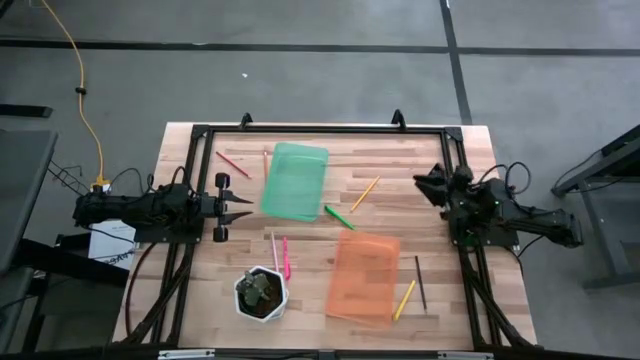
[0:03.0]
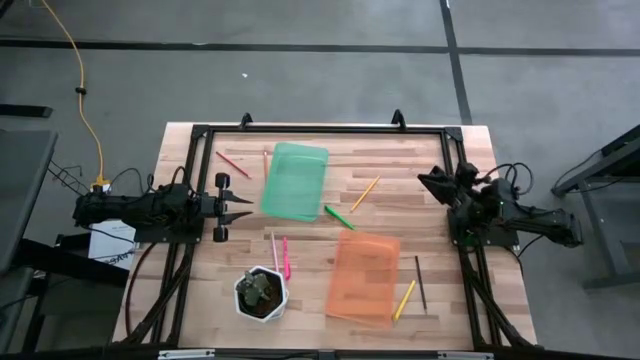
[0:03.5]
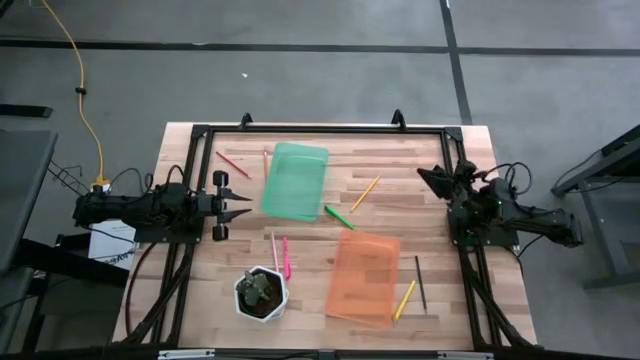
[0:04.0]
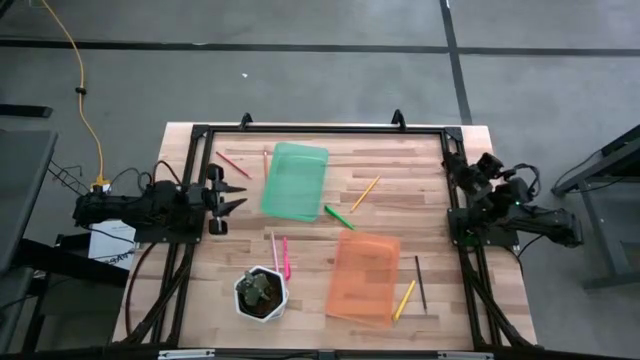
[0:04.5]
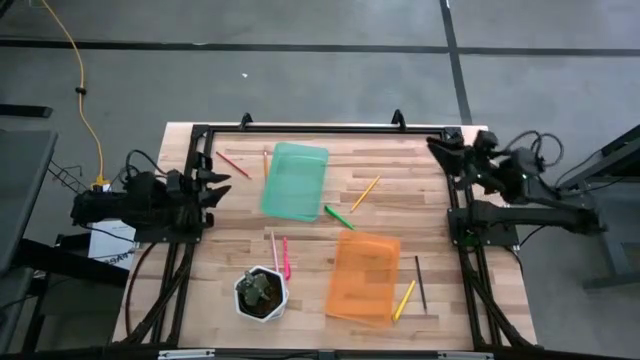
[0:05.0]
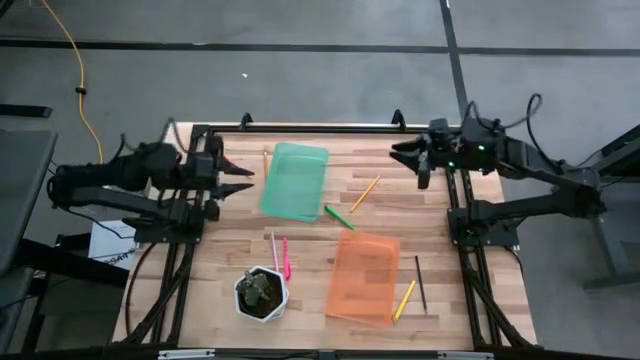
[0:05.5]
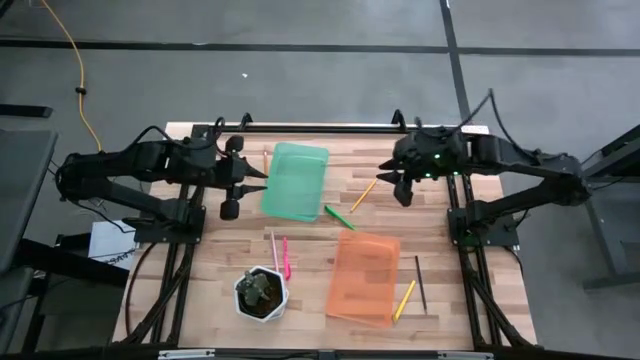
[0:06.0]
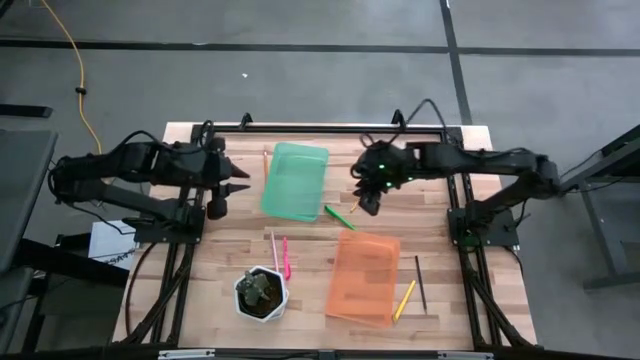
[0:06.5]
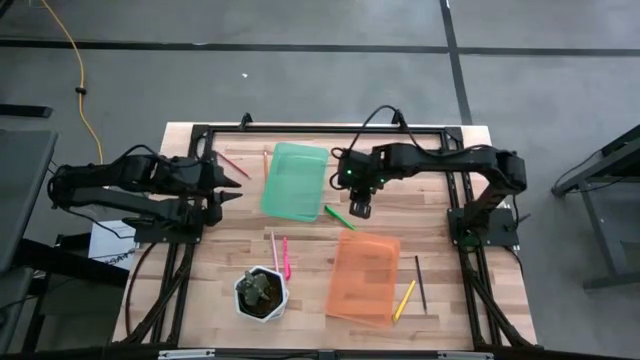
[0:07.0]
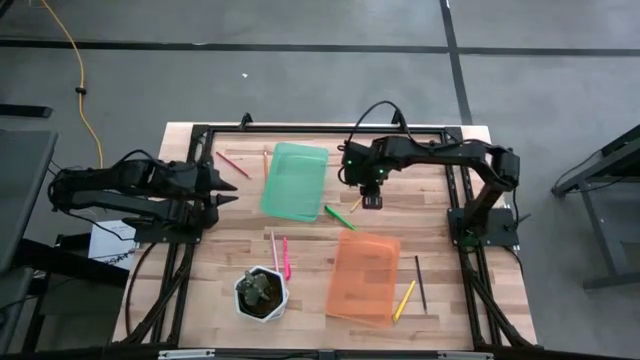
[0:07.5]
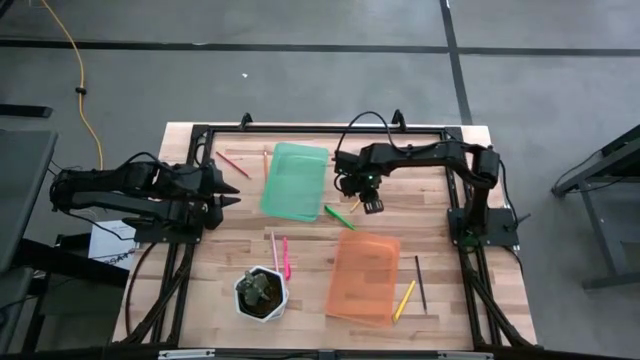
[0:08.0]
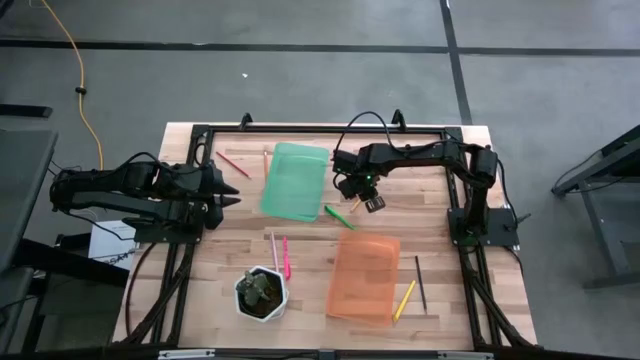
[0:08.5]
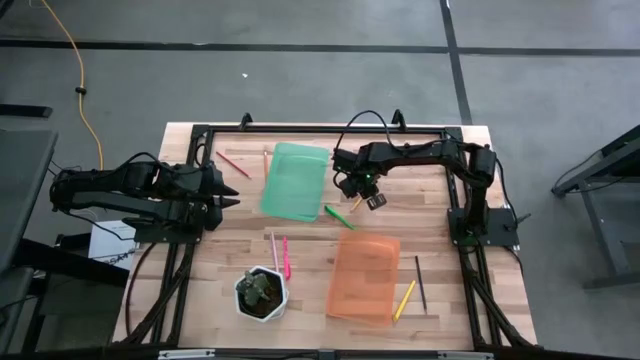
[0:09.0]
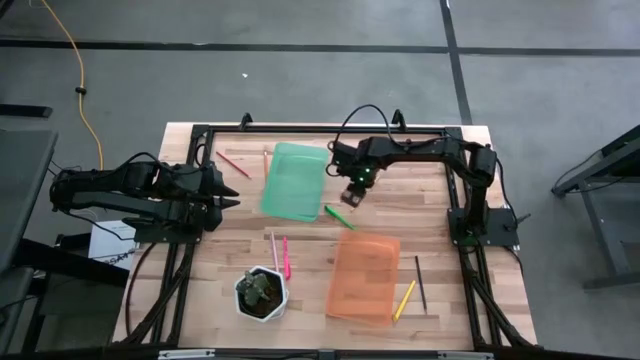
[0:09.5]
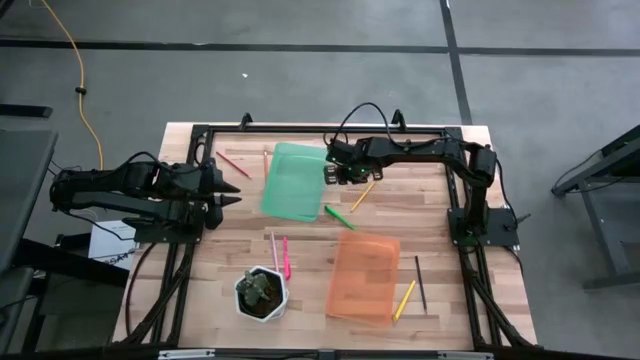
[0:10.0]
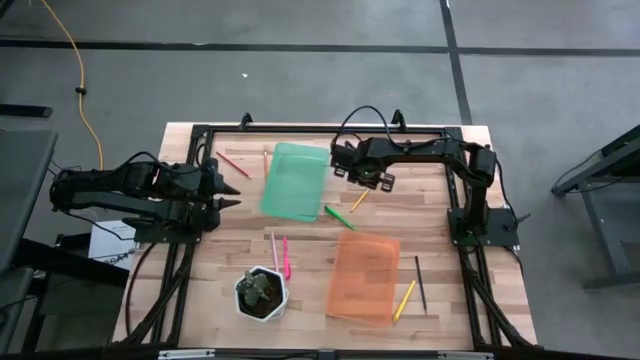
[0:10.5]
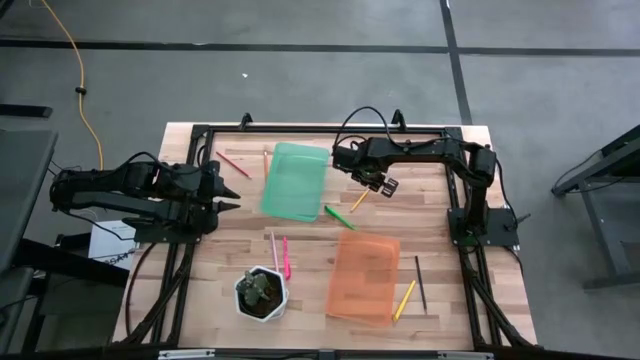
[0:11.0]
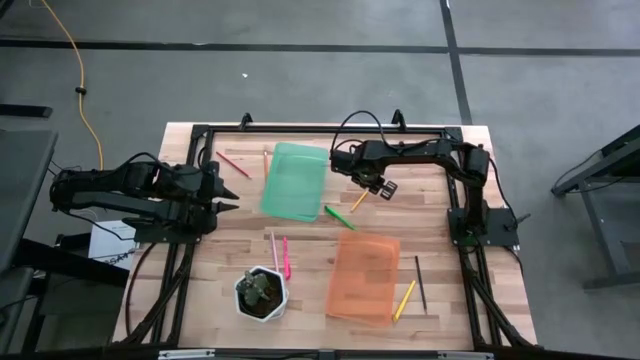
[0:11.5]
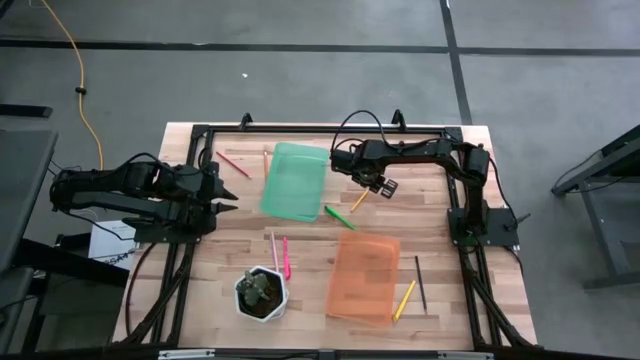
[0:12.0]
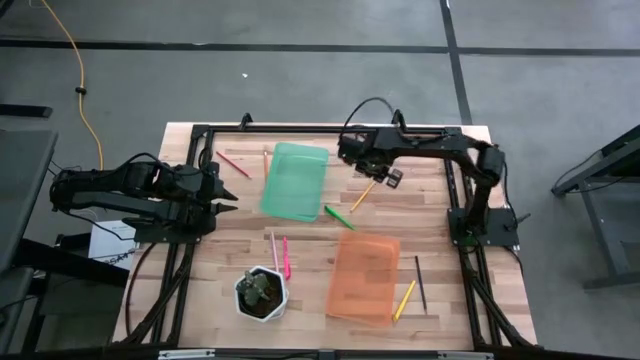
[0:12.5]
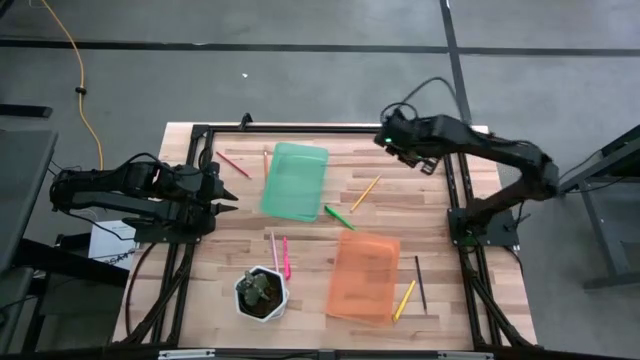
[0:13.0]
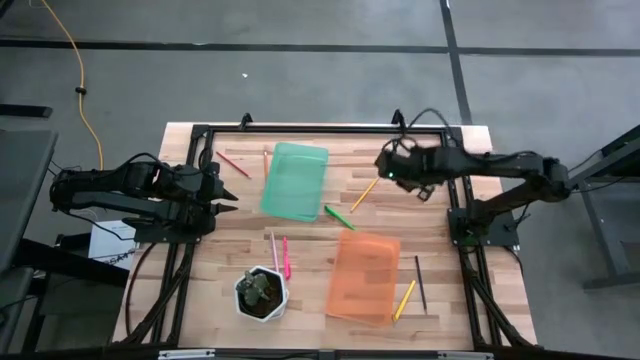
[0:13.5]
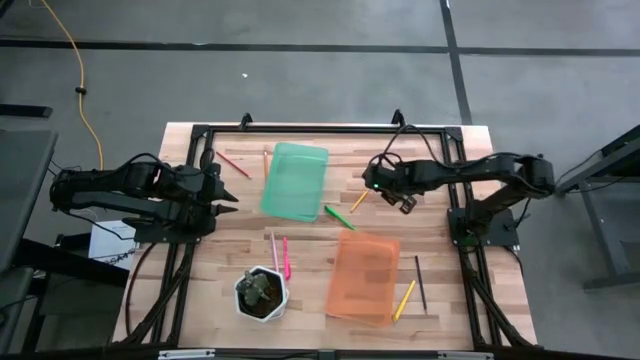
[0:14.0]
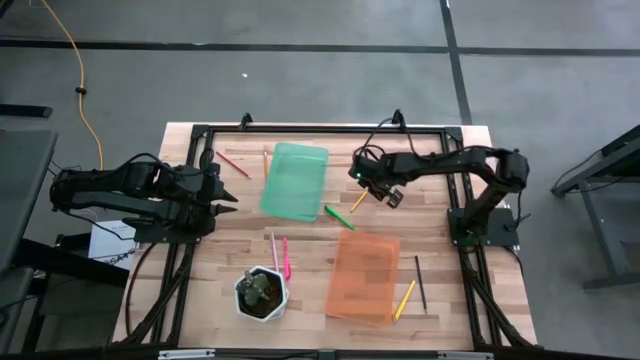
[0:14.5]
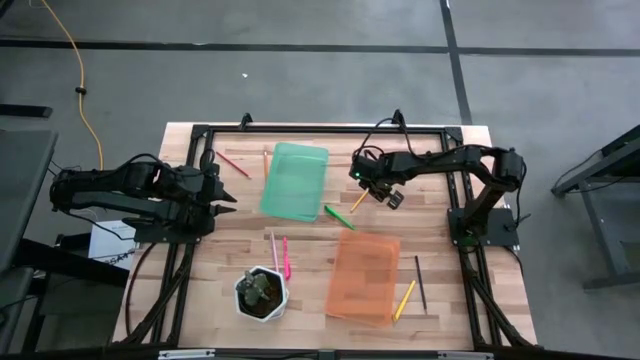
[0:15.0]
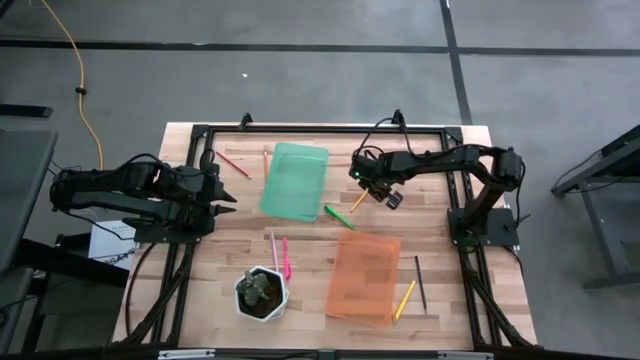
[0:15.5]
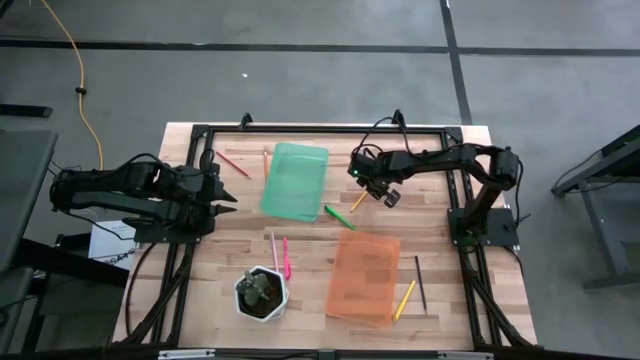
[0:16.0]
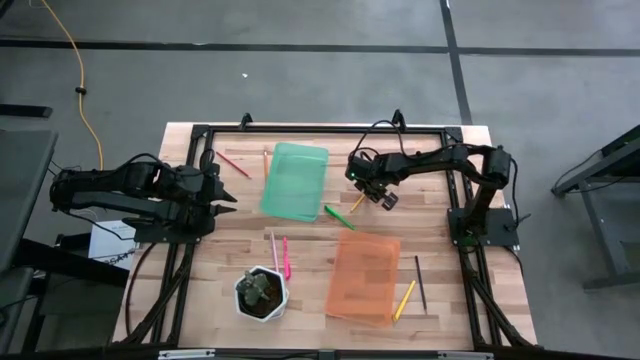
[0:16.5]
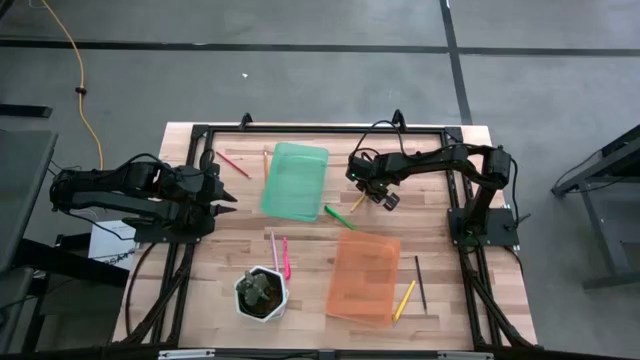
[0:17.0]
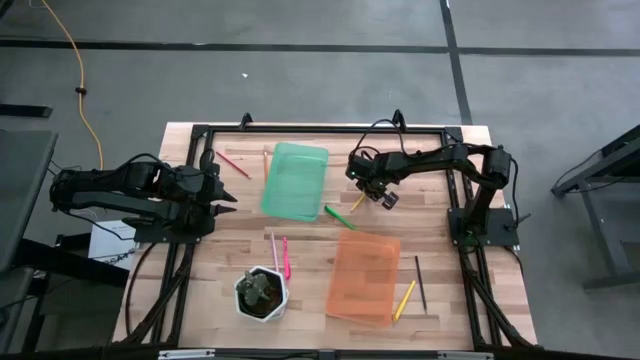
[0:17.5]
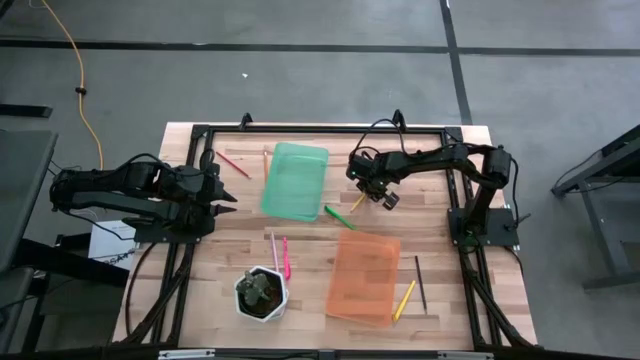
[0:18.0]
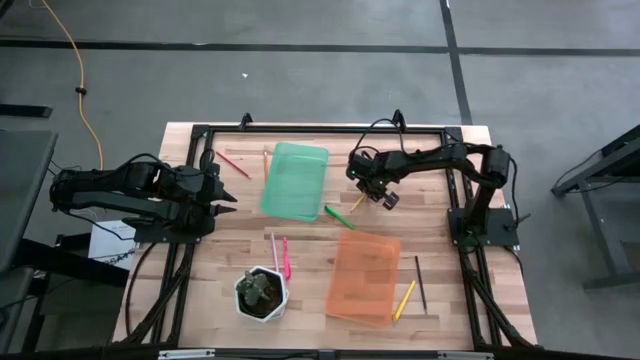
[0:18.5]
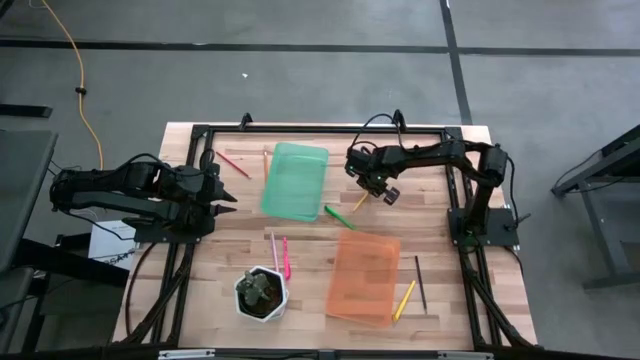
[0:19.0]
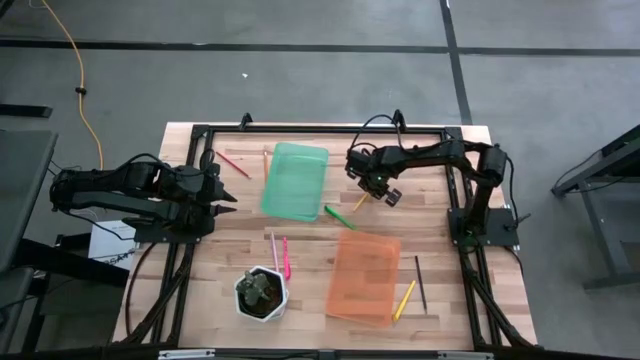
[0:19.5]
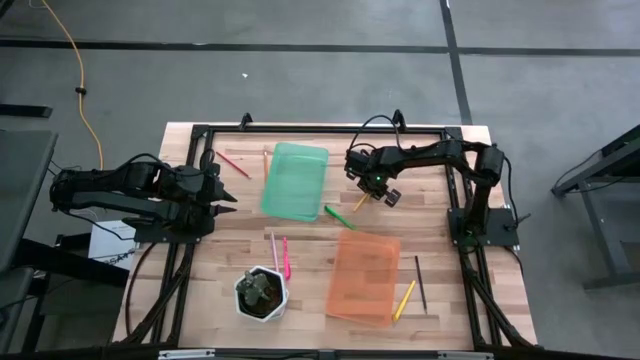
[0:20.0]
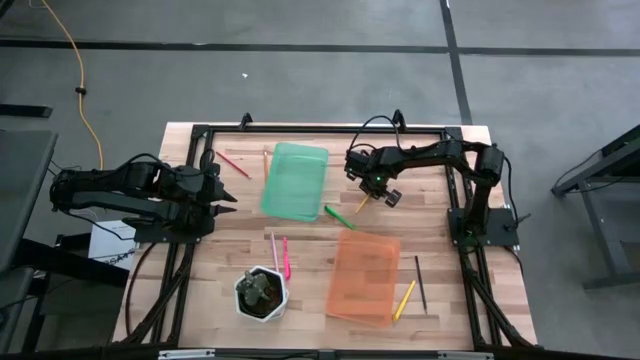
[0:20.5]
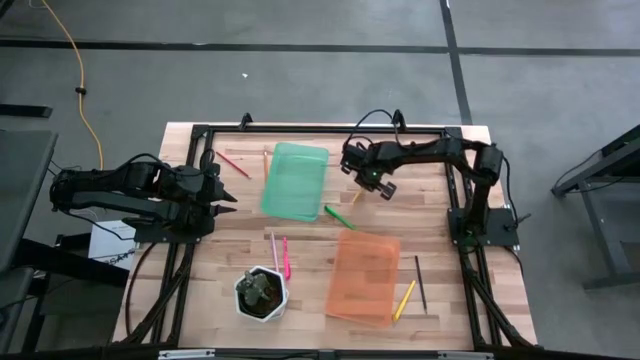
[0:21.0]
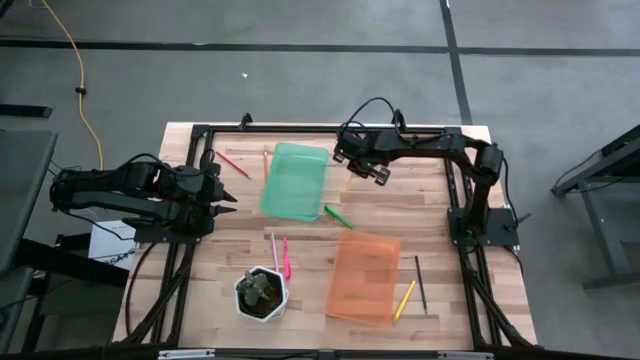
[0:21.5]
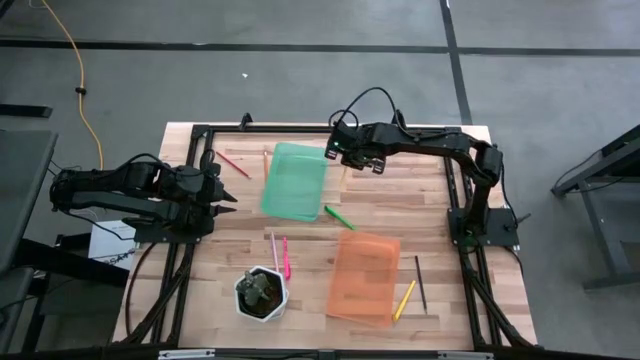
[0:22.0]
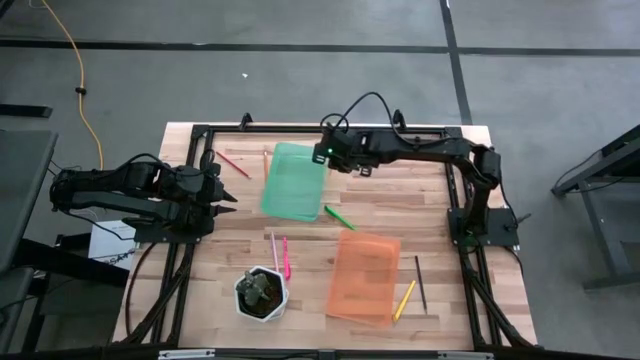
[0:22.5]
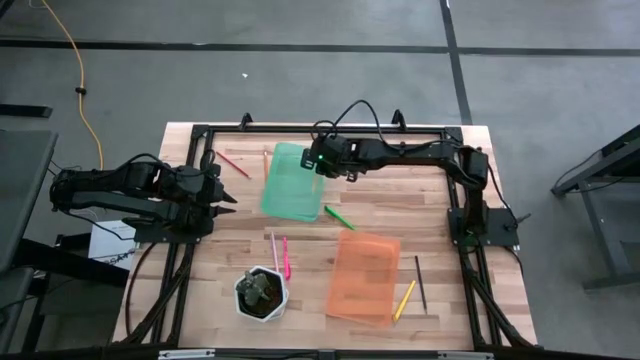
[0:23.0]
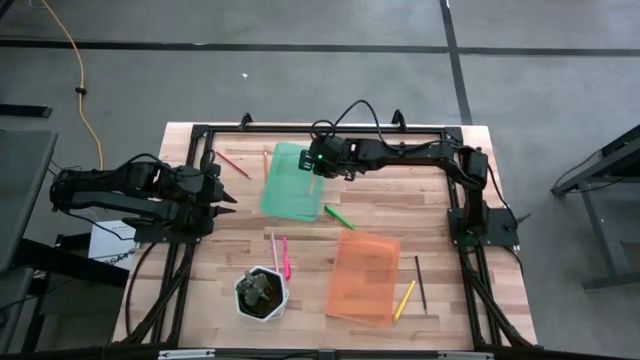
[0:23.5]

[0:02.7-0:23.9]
Task: Sort pens & pencils
Put the yellow pencil into the green bin
